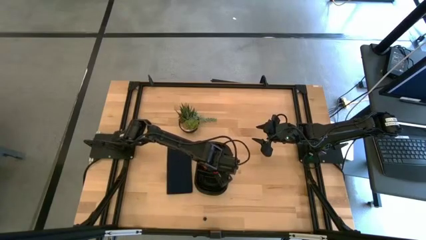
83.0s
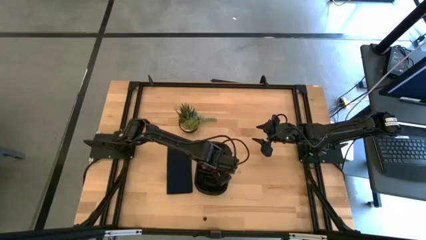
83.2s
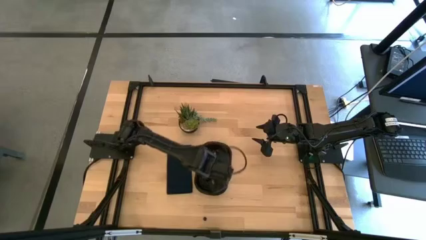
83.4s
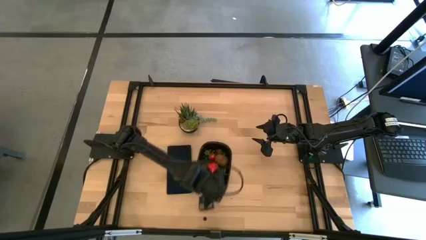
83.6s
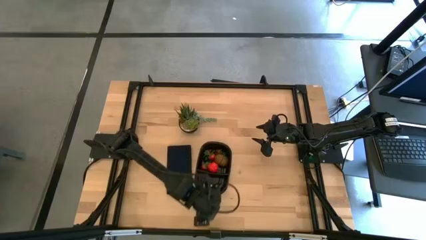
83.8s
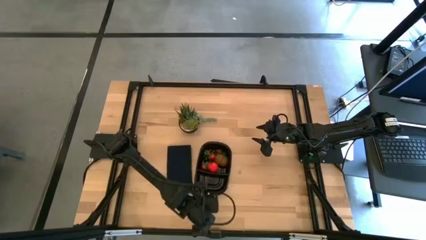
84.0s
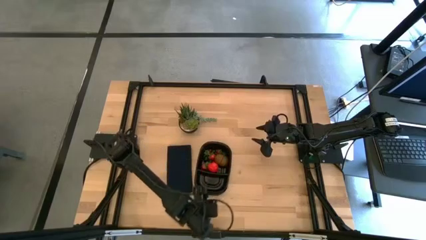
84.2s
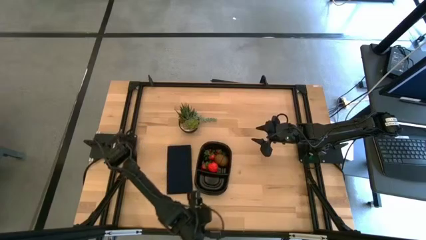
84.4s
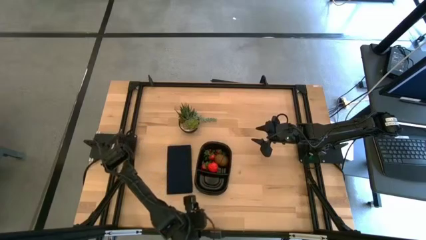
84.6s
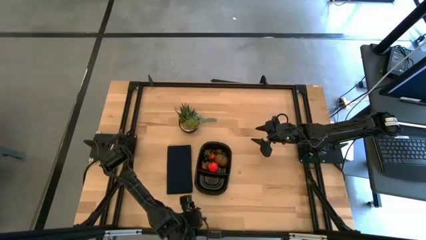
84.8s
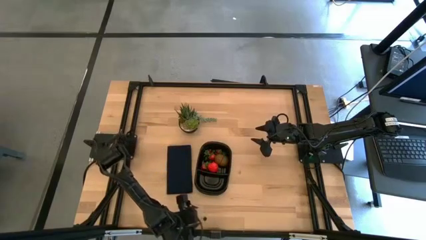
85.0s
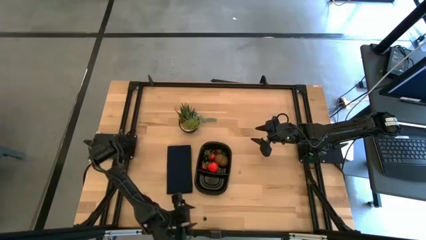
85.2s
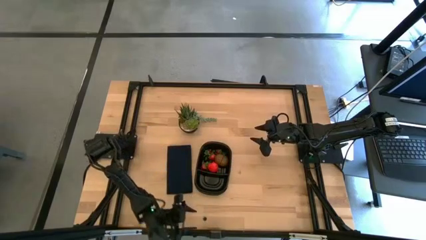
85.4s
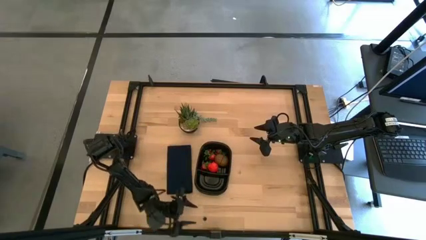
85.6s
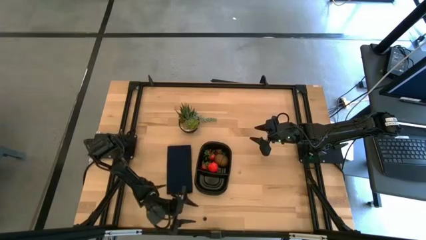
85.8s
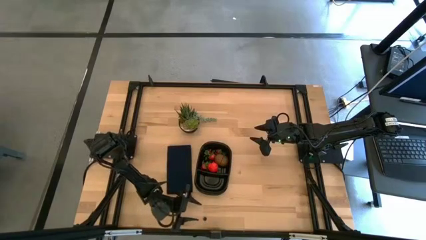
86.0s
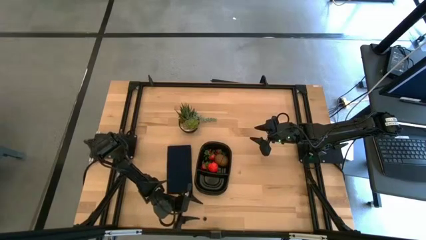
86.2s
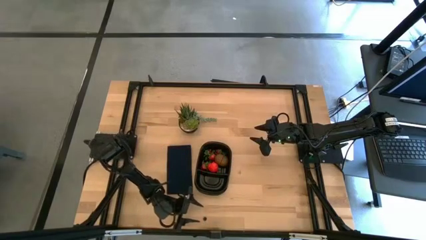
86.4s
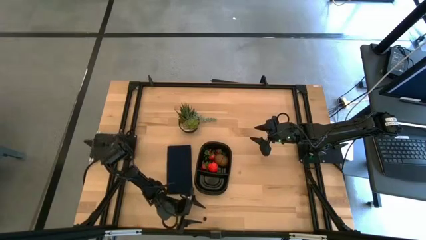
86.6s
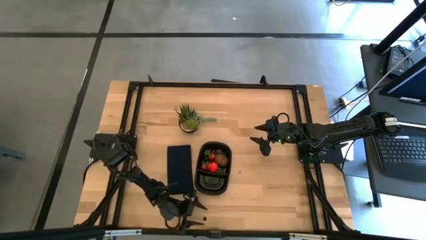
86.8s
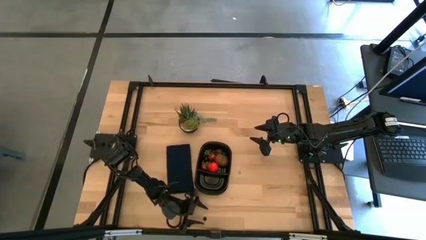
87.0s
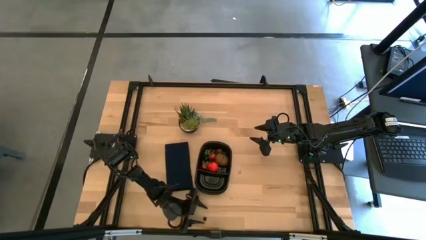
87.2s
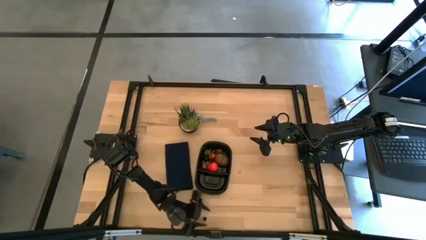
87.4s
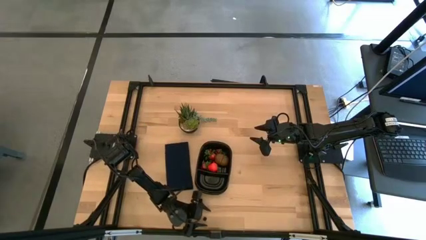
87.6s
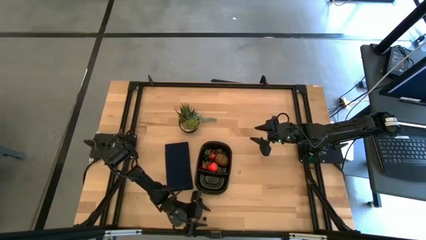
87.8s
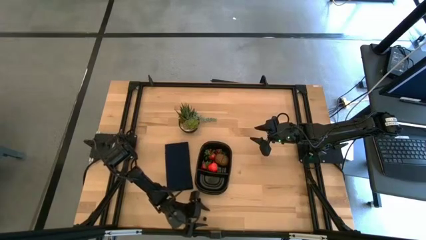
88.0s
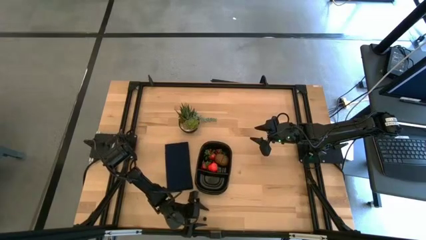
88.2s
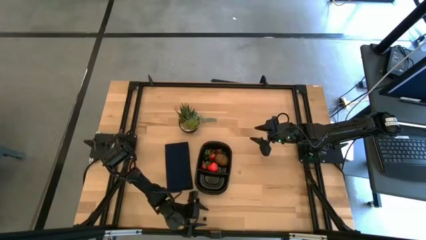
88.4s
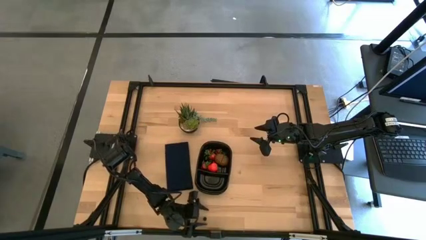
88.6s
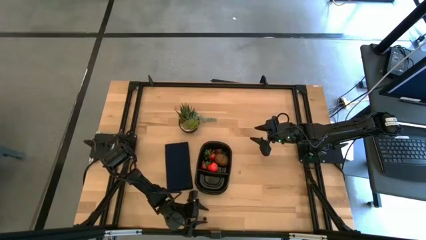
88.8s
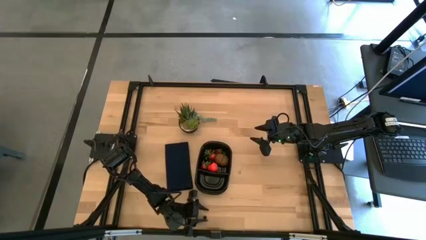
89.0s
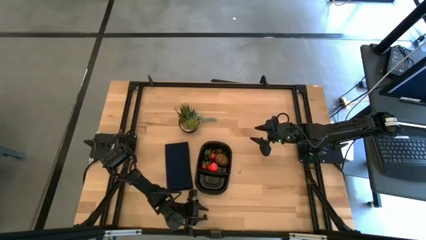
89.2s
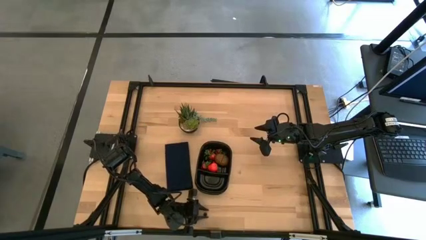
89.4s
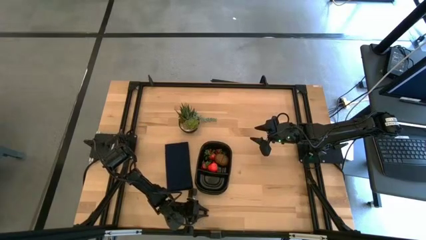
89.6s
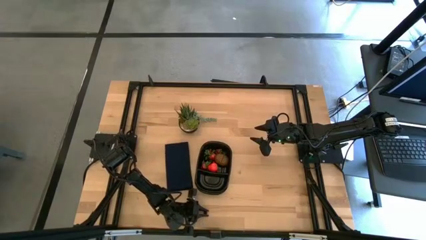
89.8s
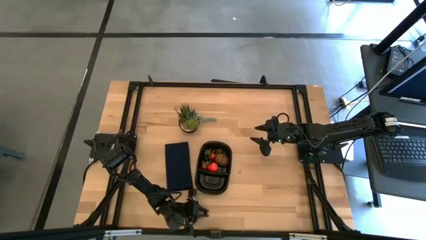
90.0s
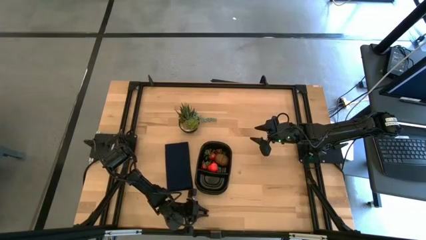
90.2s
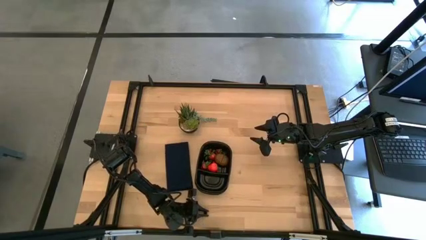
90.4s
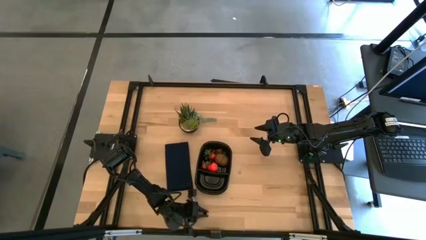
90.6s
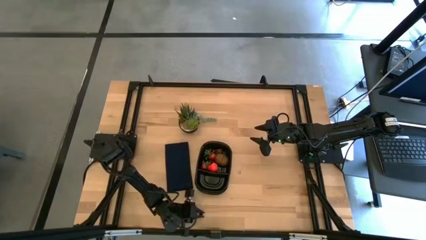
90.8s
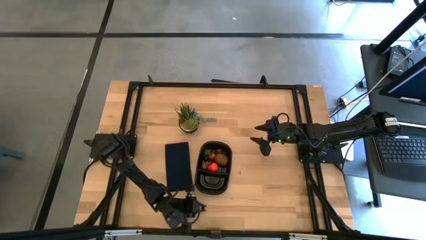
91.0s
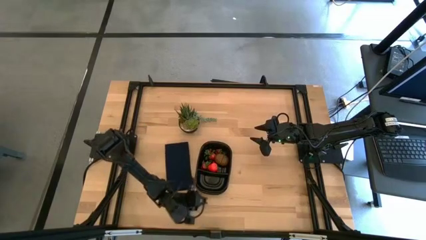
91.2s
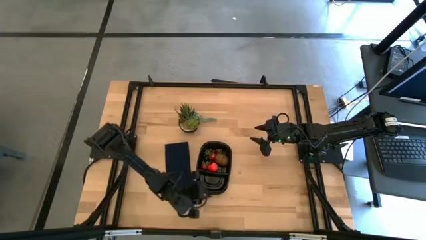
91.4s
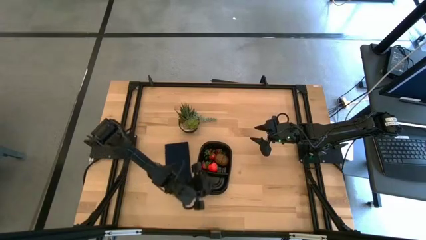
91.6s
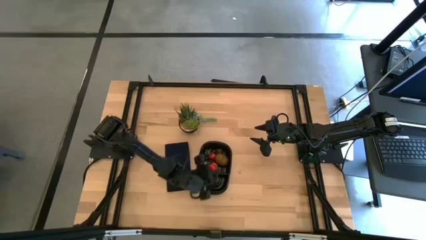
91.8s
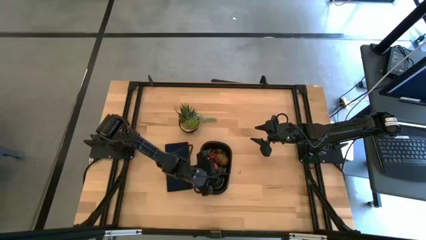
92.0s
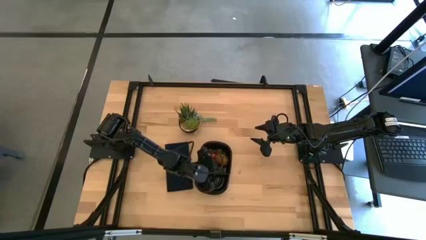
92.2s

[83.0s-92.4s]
Task: Pick and placing Produce into tupperware
Put the blueberry into the black bin

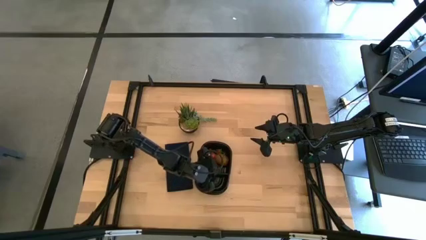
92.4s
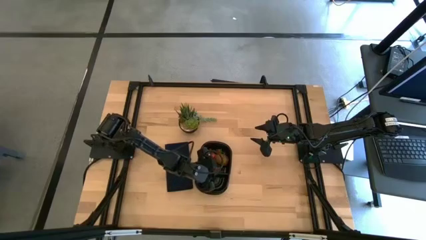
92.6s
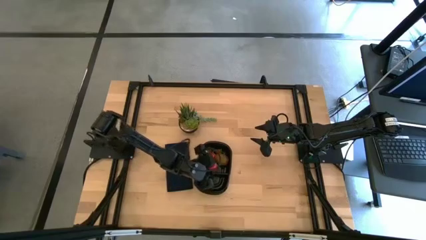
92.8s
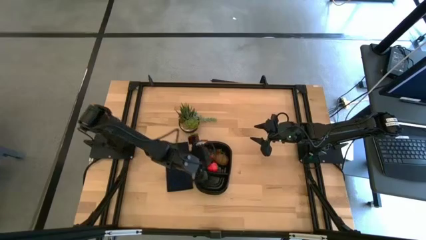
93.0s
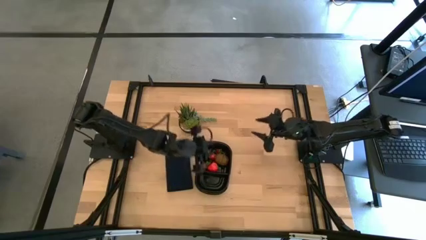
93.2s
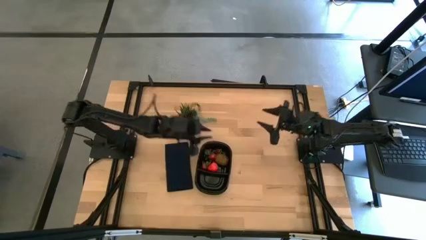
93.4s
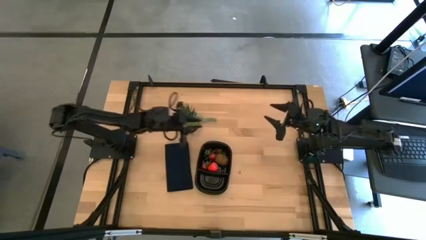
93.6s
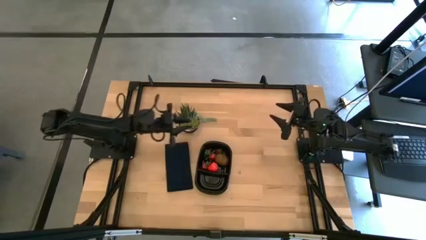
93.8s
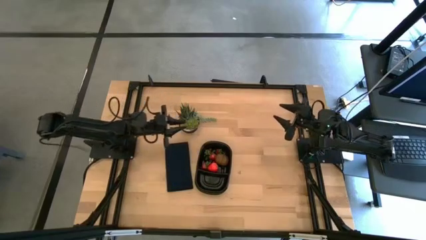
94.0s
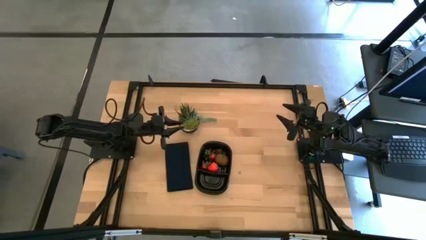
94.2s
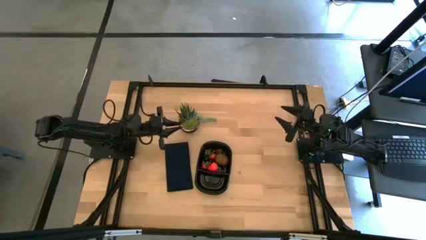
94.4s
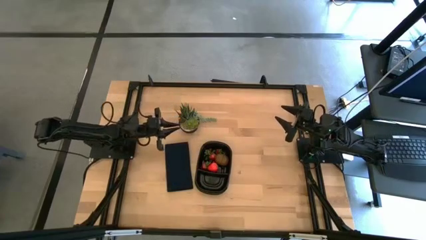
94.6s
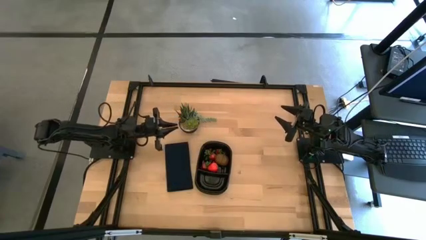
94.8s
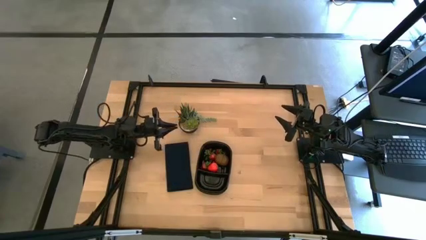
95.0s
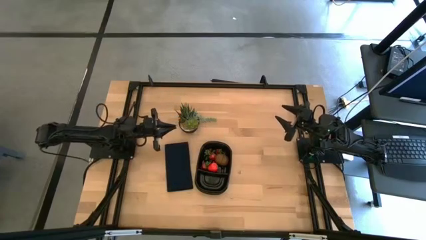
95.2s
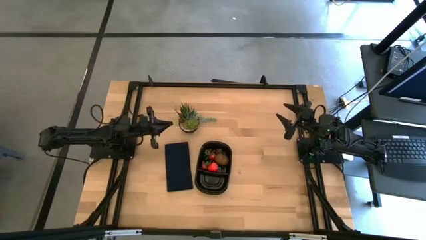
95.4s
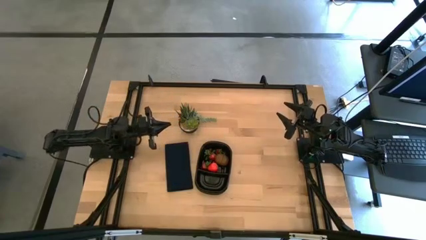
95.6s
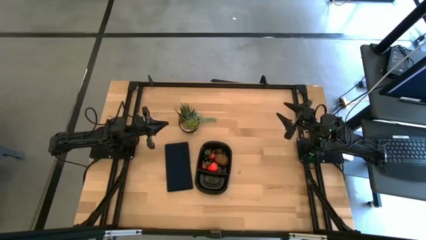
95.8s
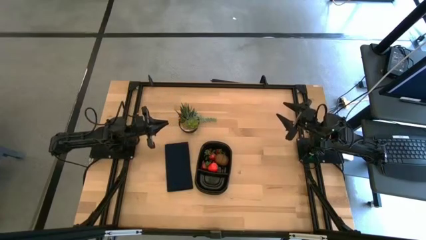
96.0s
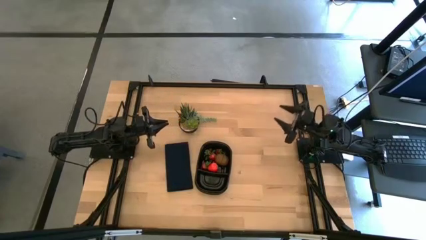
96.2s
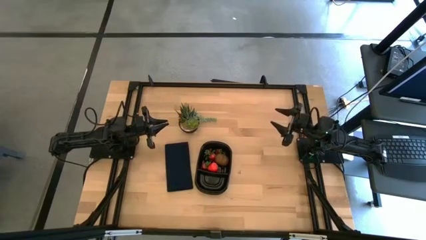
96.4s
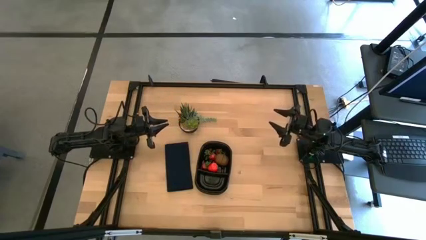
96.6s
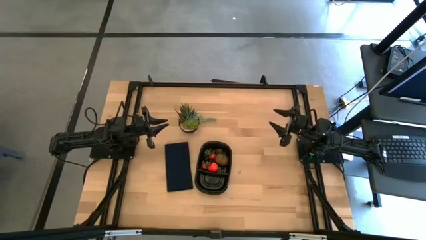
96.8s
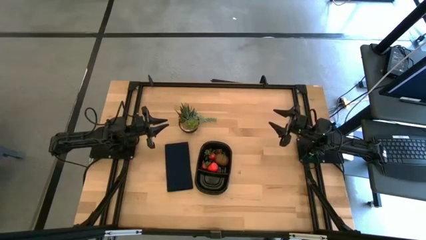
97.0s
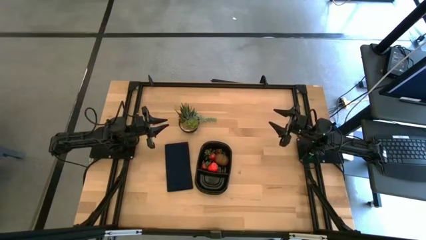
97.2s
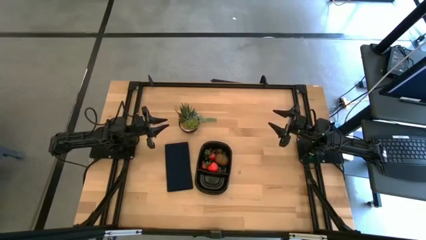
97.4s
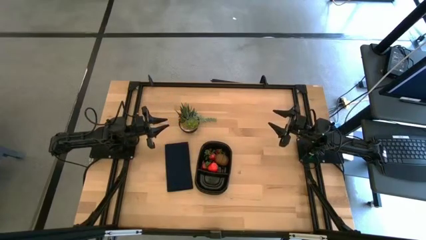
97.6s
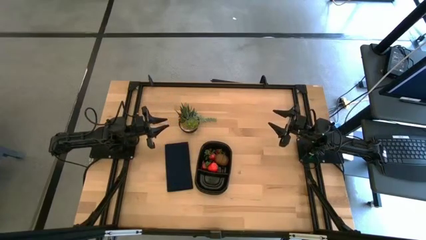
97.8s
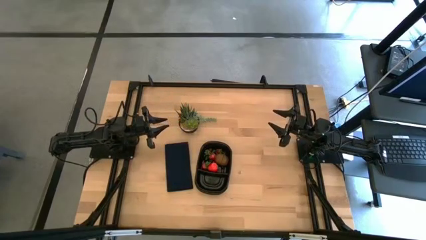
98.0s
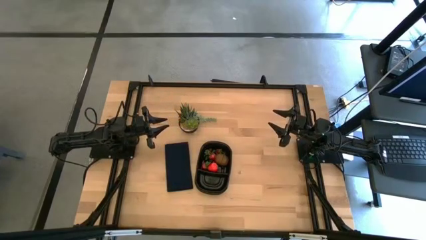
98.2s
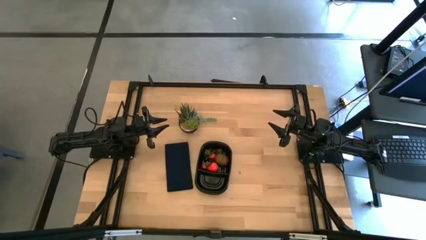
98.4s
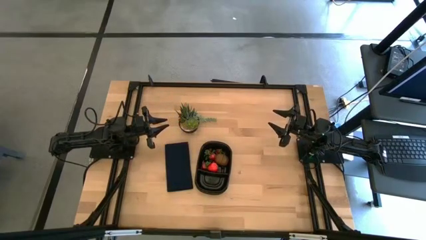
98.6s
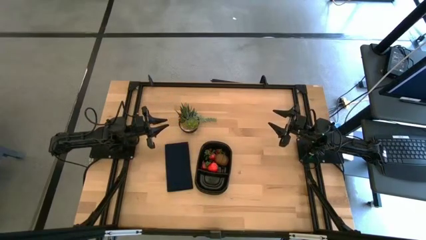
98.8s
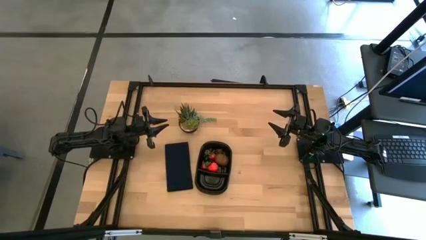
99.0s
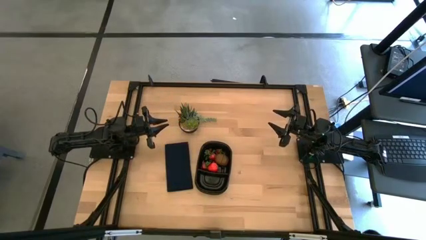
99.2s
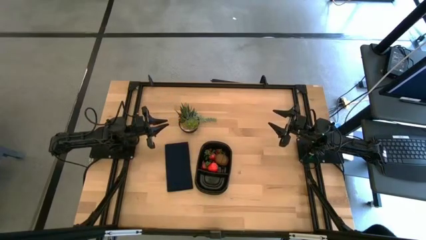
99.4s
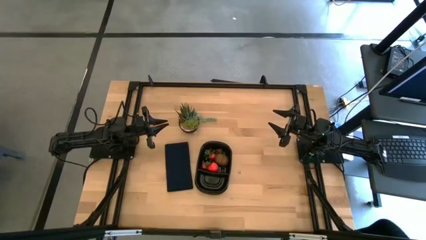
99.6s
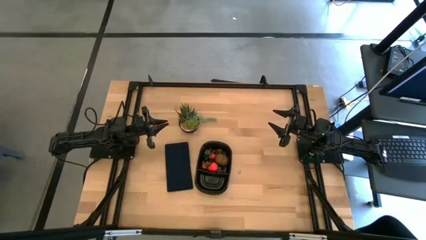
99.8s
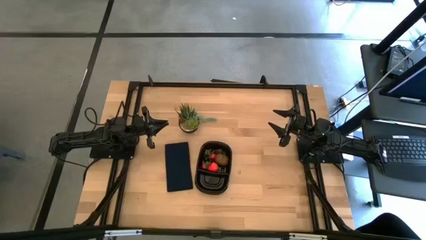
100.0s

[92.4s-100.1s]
Return to Home Position
